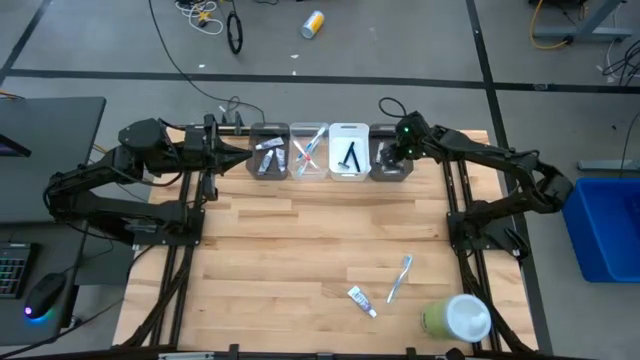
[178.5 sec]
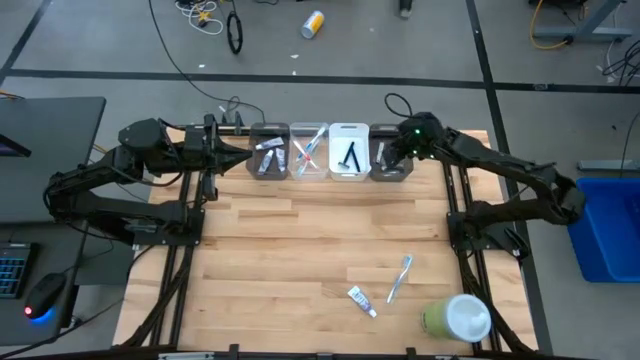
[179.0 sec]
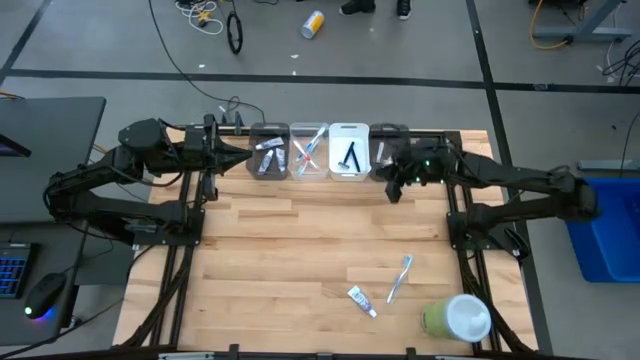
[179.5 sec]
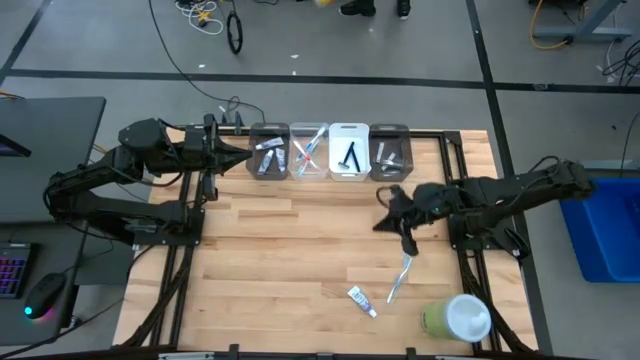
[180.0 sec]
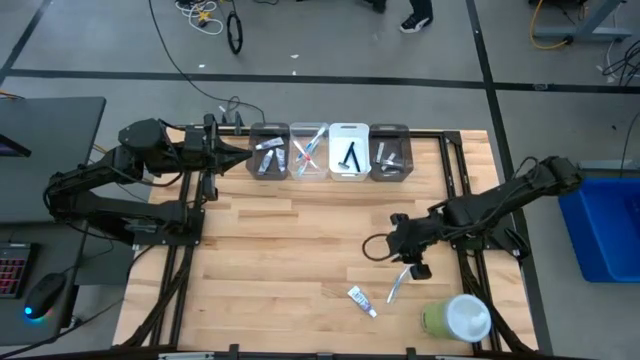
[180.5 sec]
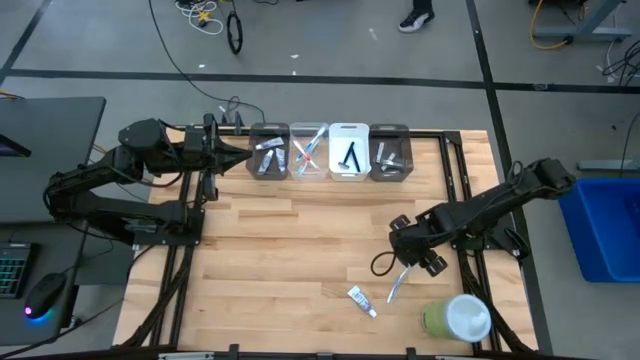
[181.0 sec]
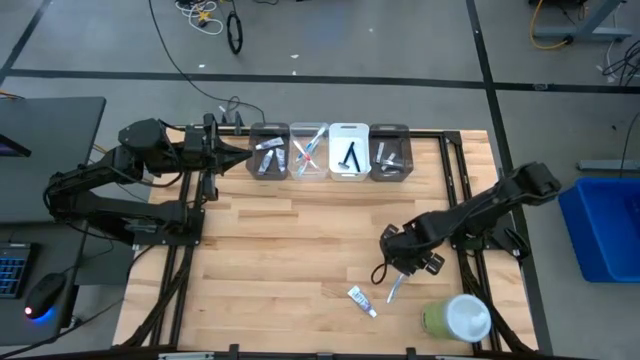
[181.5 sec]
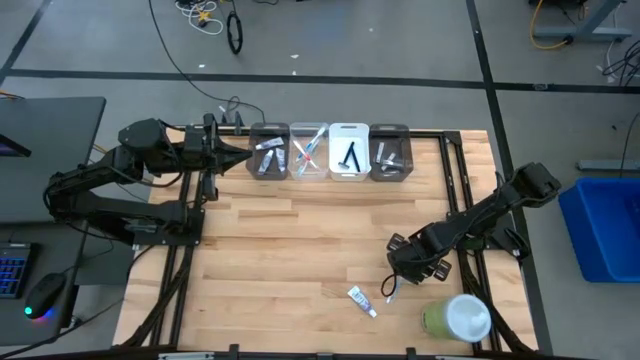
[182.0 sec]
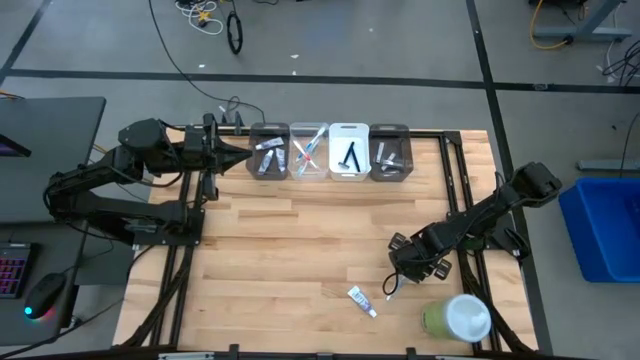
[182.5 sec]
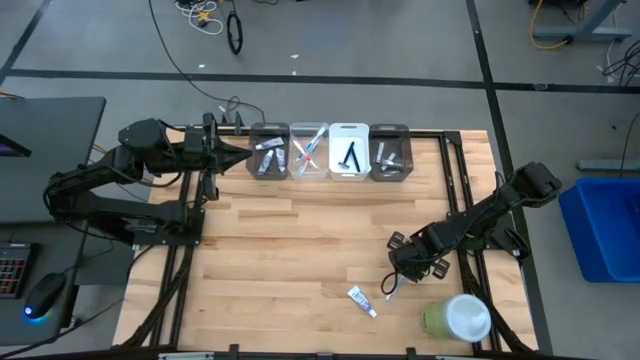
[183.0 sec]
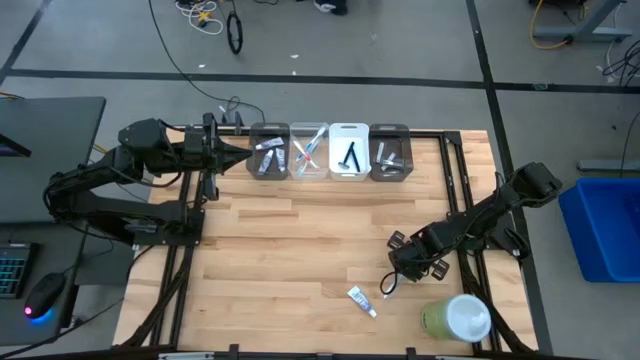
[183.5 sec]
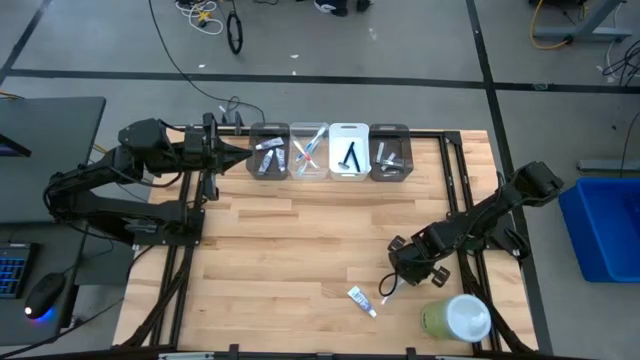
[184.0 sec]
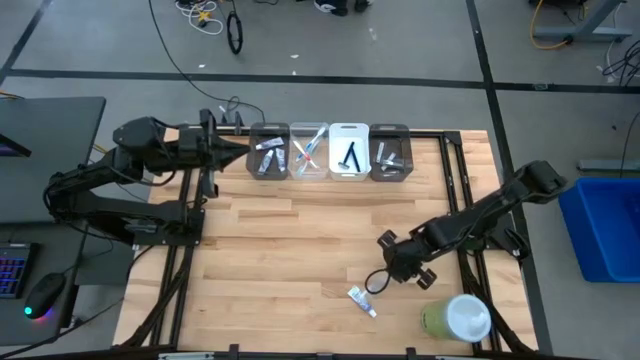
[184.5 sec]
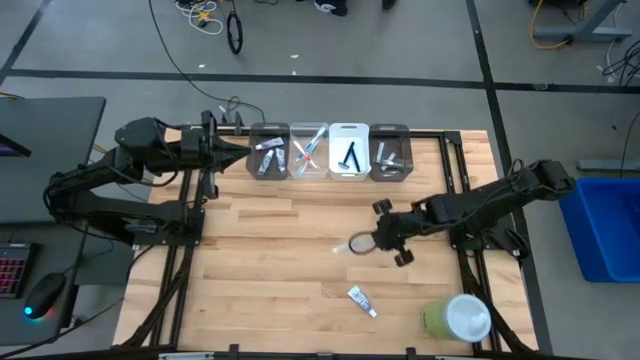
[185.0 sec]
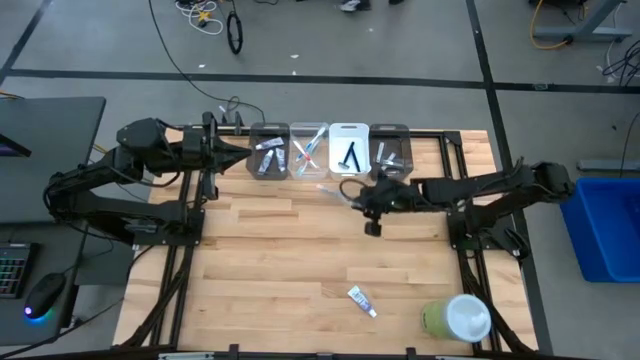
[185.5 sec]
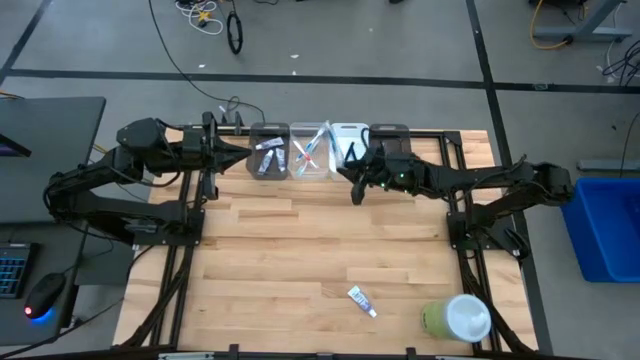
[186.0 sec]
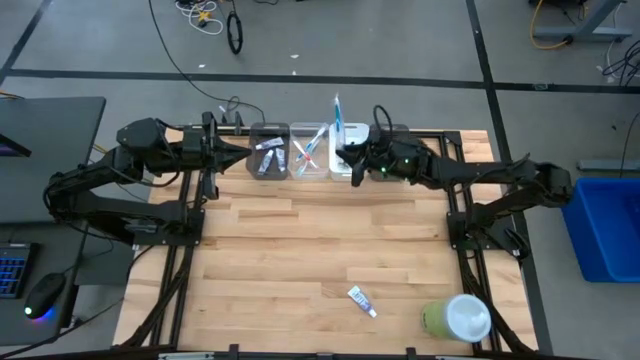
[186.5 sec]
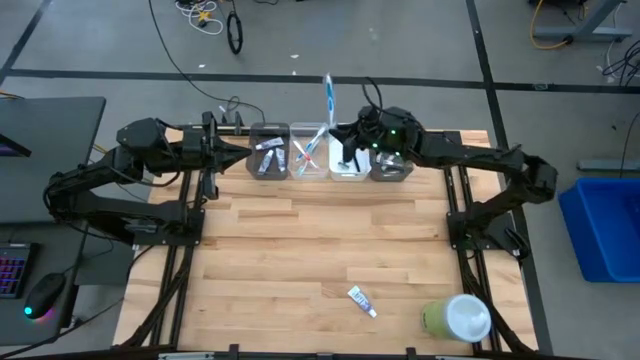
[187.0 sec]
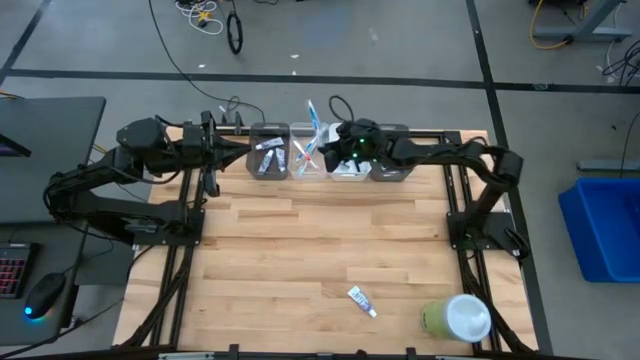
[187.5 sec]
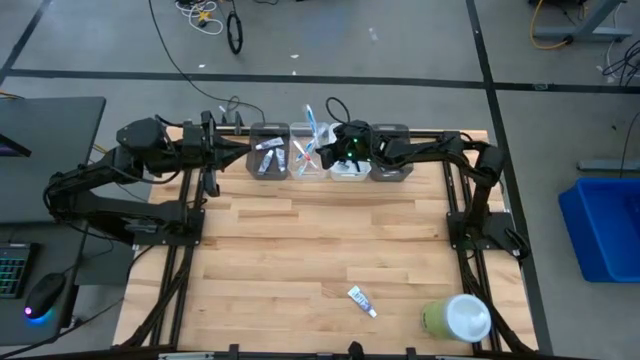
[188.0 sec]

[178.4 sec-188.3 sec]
Task: Pick & Place Travel size toiletries
Put the blue toothbrush into the transparent bin

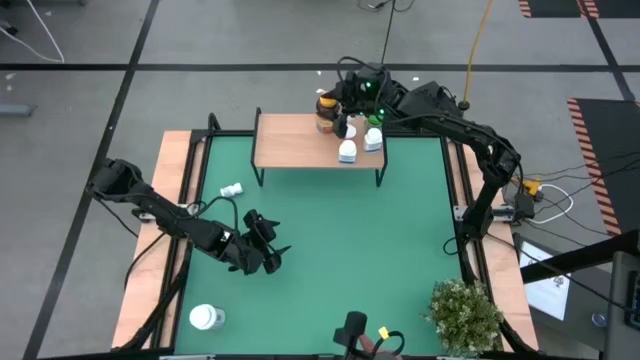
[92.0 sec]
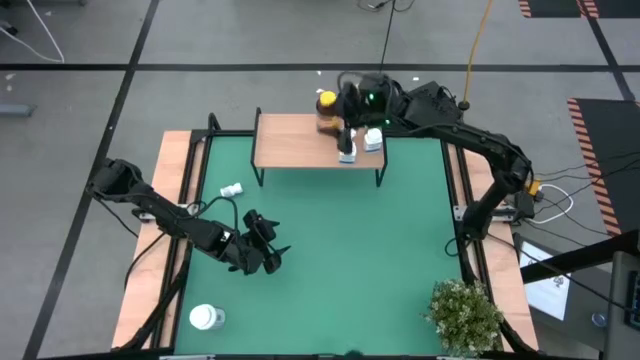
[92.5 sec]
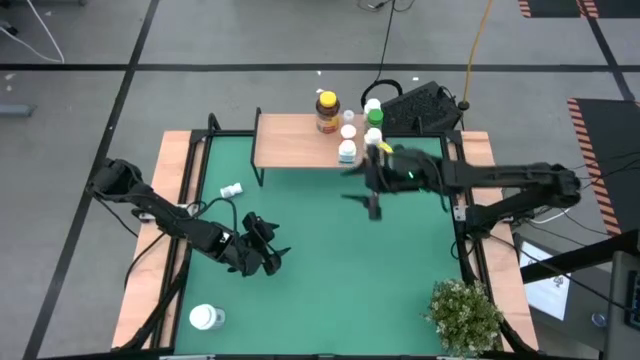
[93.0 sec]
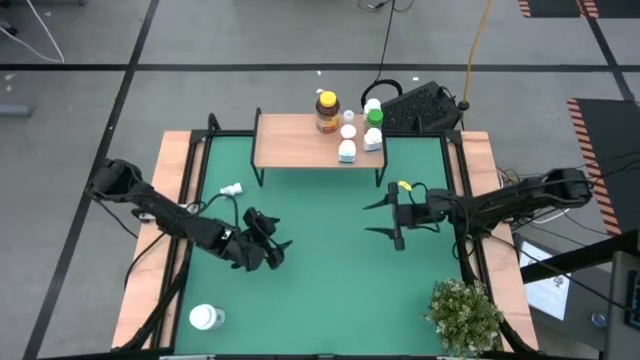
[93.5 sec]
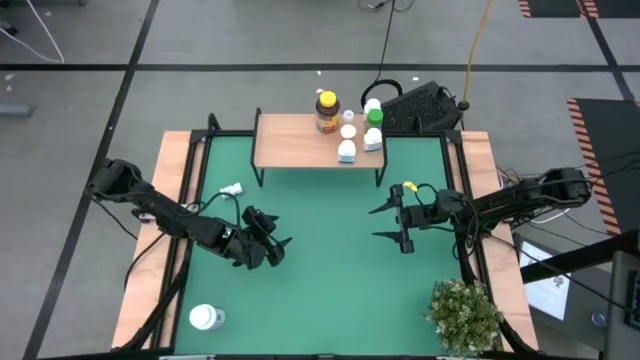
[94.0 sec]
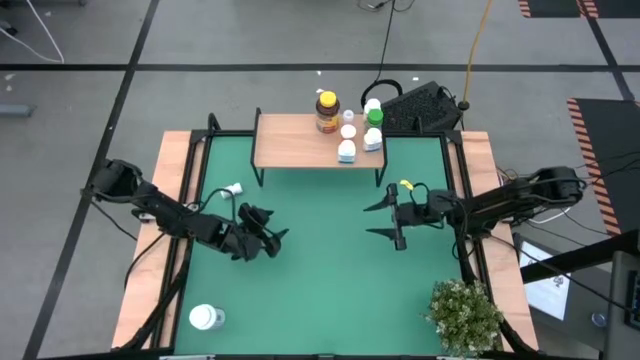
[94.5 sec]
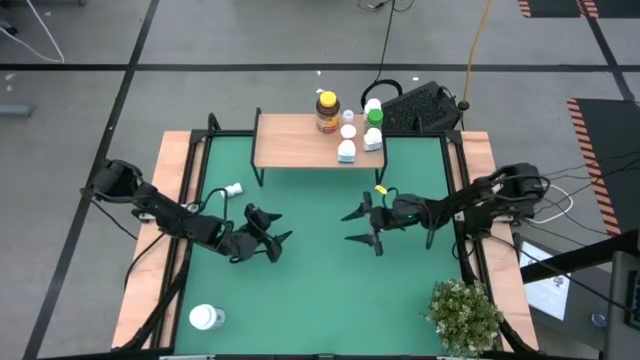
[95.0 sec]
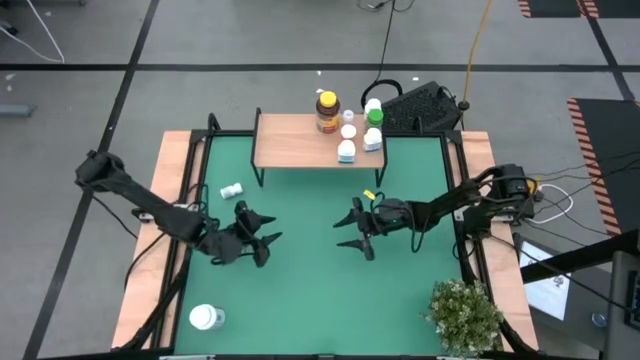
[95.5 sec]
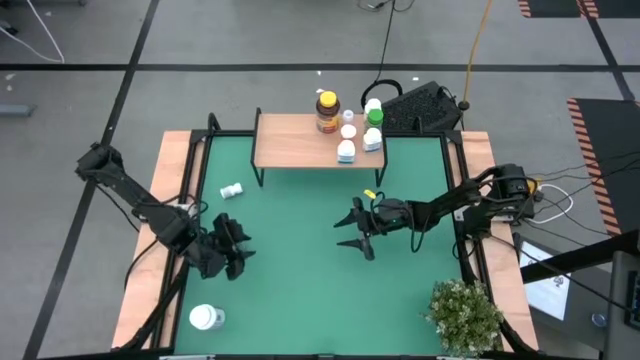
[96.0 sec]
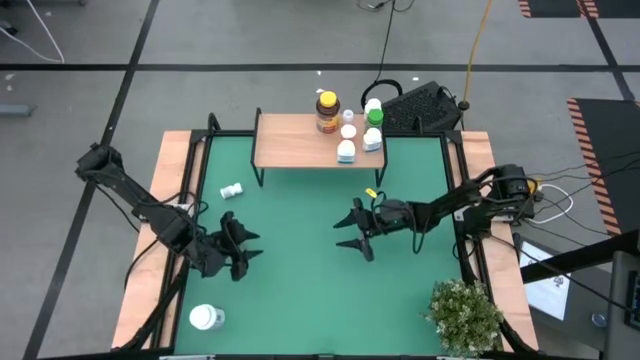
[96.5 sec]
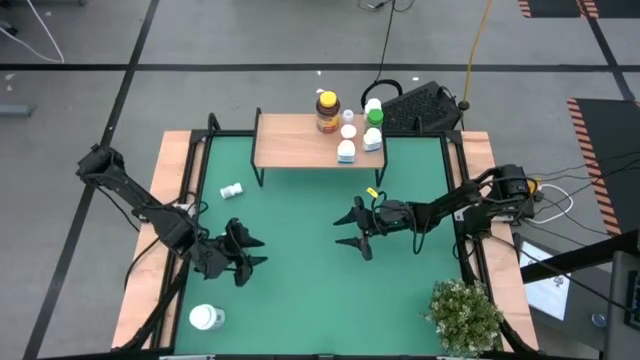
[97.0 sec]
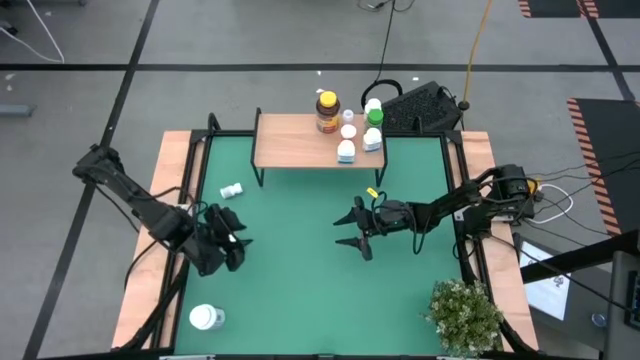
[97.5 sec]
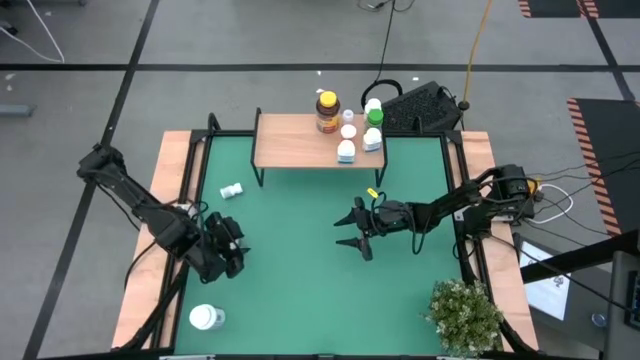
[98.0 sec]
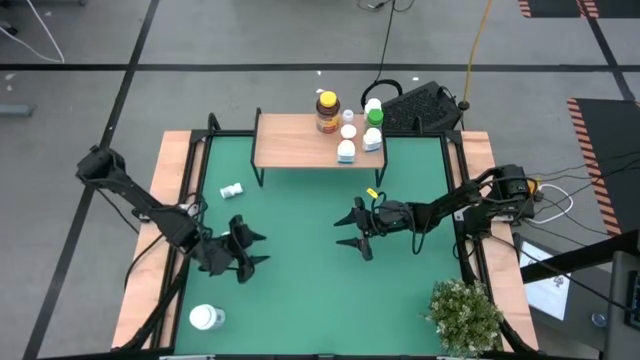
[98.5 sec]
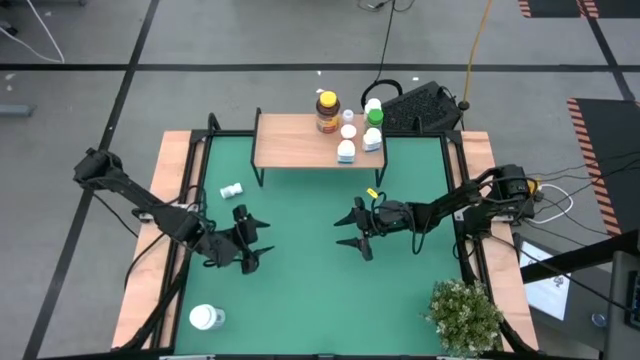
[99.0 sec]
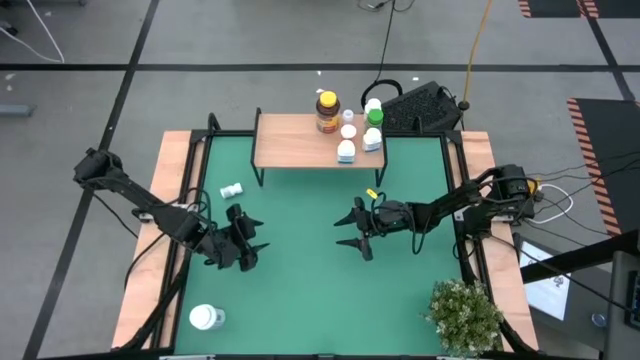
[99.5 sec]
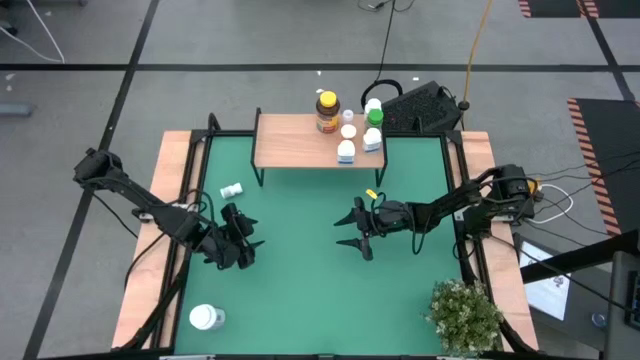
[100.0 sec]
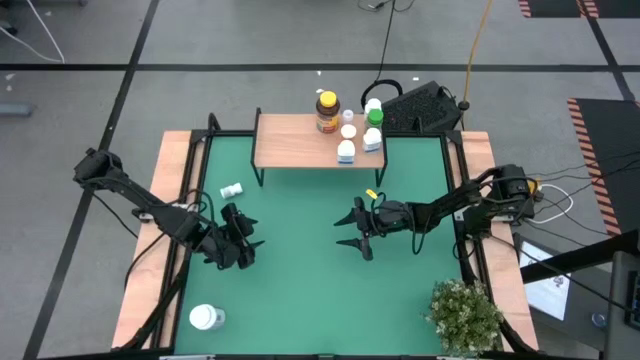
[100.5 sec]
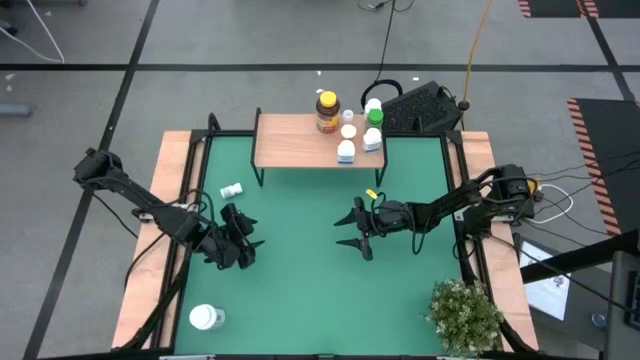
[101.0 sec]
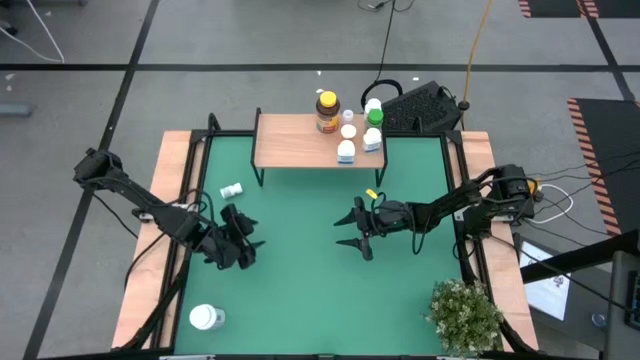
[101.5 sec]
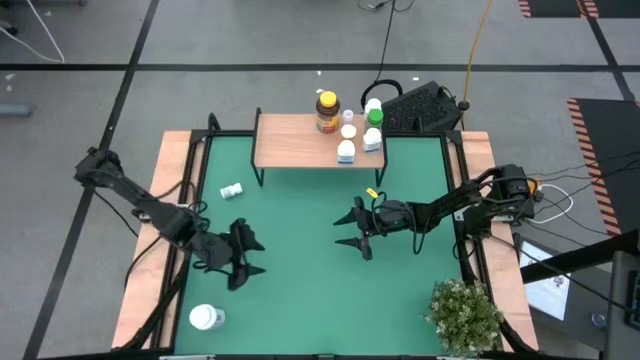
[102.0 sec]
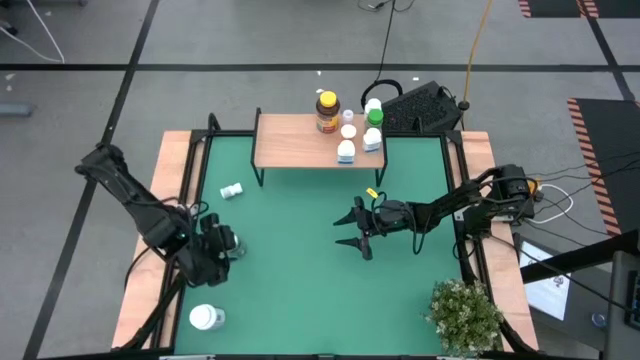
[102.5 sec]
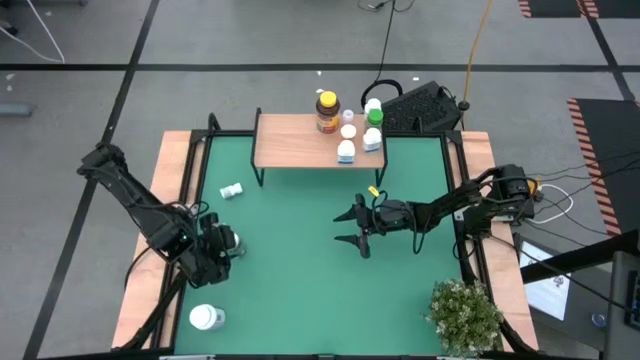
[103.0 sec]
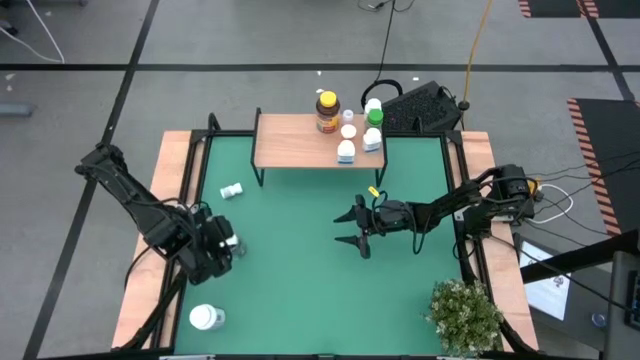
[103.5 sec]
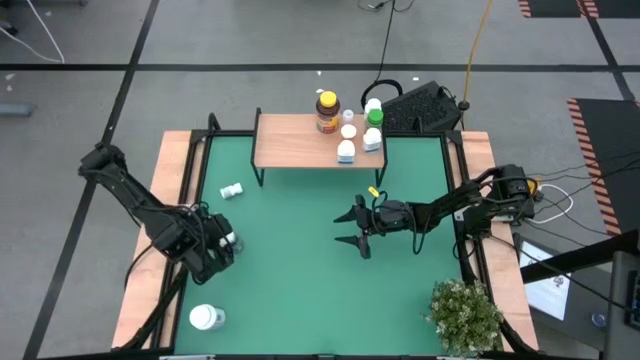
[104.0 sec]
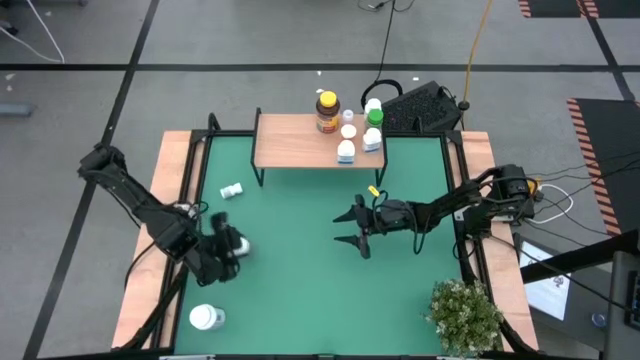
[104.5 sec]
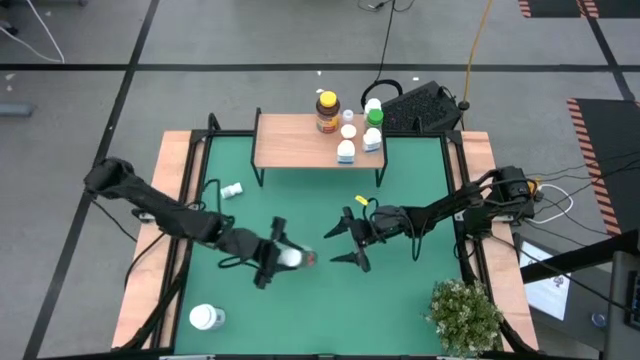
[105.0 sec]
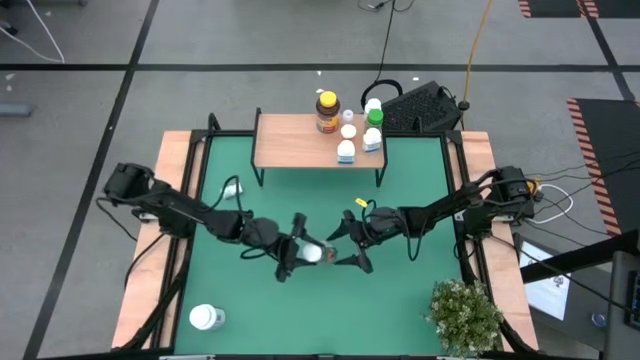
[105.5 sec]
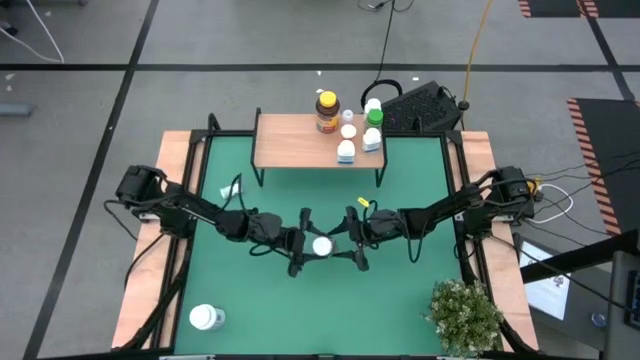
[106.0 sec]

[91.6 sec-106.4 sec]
Task: Pick and place medicine bottles onto shelf by color
Put the green medicine bottle on the shelf
